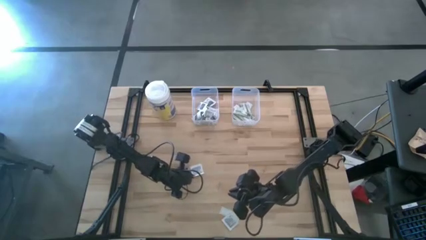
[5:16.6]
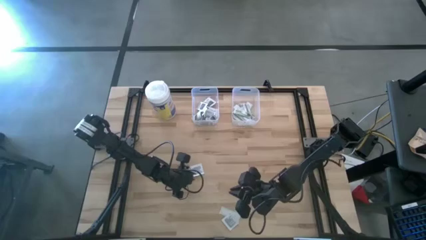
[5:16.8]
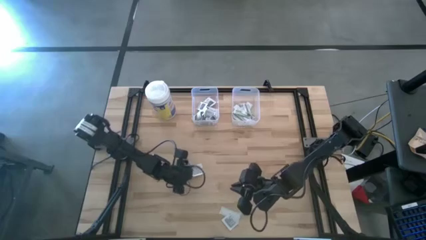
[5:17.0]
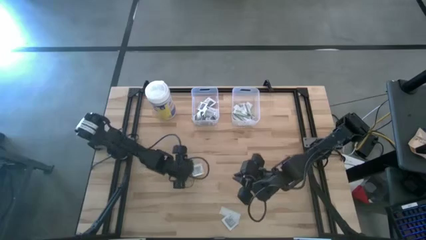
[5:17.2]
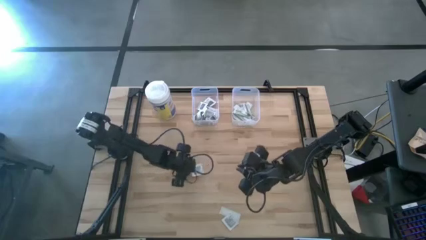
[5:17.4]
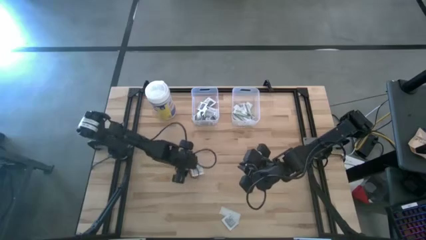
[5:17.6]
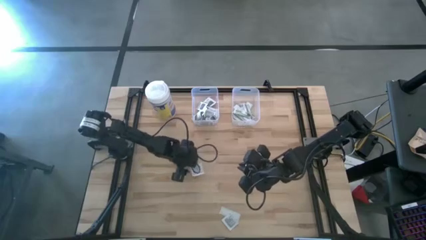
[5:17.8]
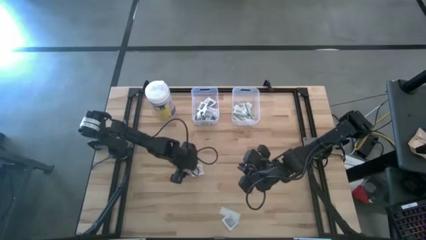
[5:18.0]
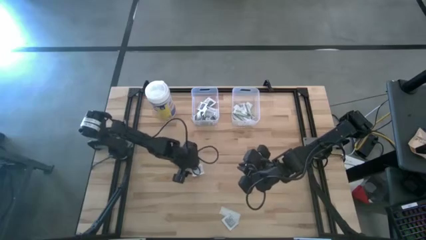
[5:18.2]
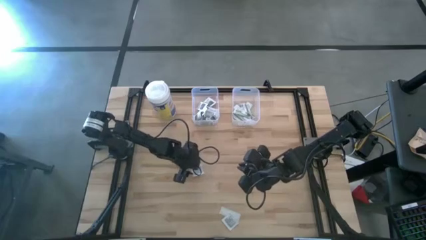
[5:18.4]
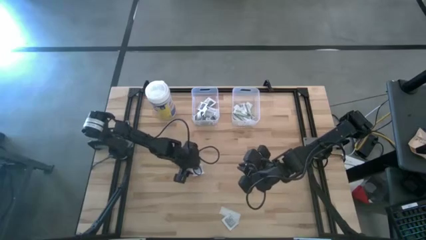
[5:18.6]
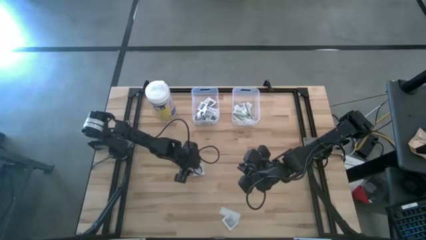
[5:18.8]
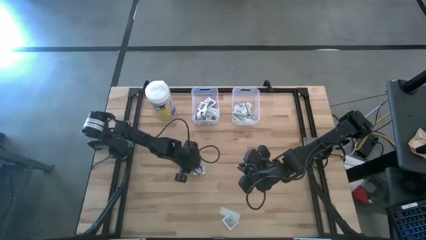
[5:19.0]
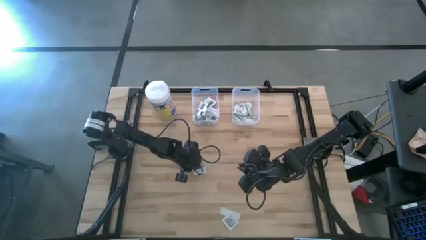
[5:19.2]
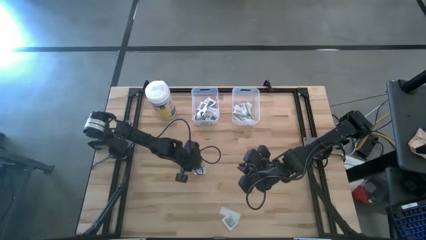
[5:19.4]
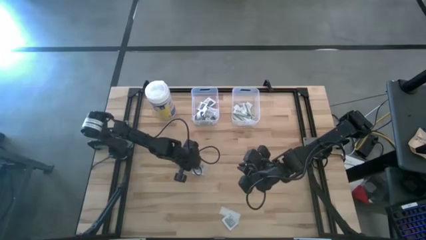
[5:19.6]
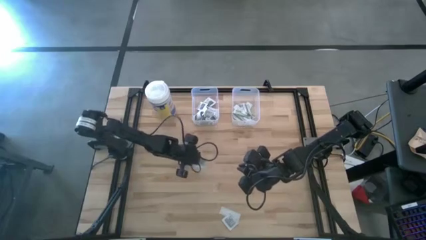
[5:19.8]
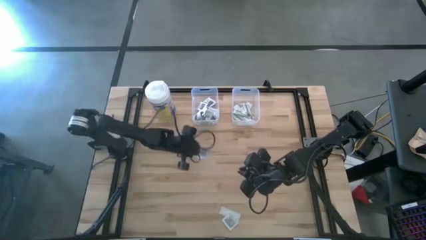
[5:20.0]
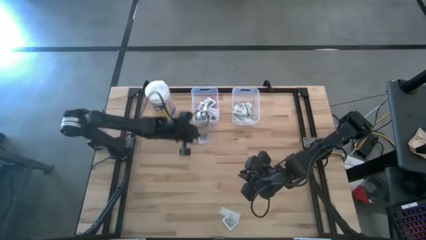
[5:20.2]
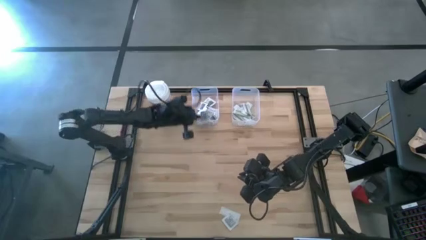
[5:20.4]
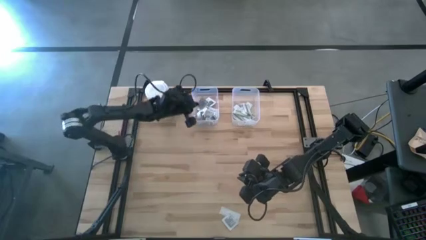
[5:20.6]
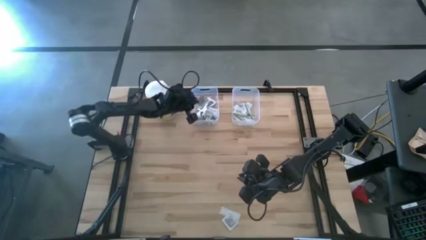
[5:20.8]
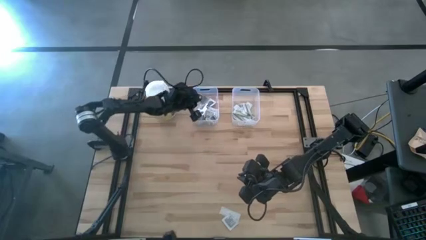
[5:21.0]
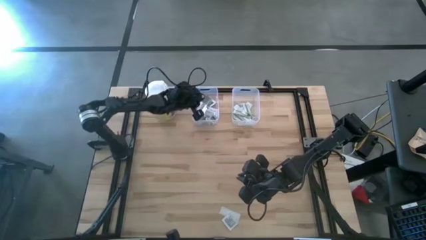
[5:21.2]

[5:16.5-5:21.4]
Task: Pick & Place First Aid Supplies
Put the towelette pack into the left transparent bin

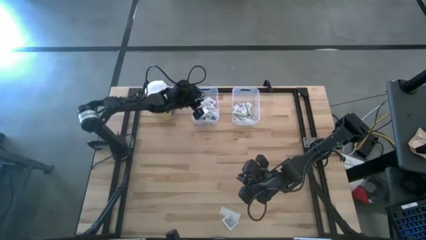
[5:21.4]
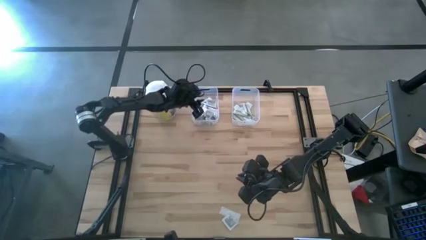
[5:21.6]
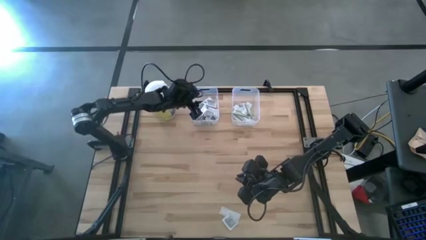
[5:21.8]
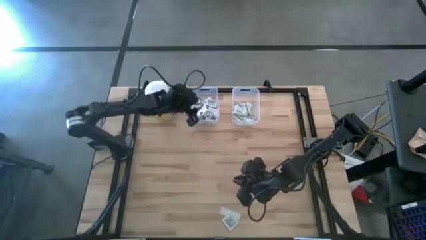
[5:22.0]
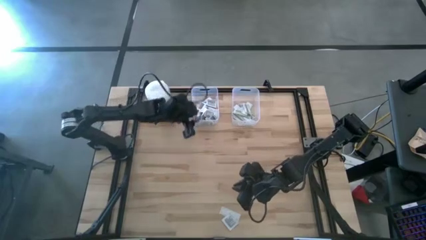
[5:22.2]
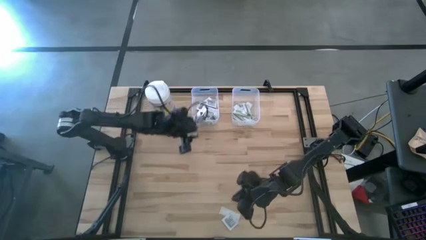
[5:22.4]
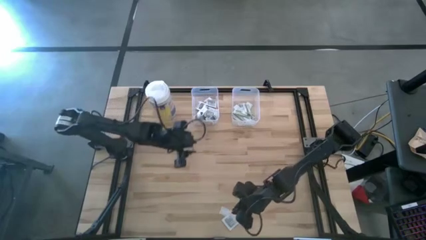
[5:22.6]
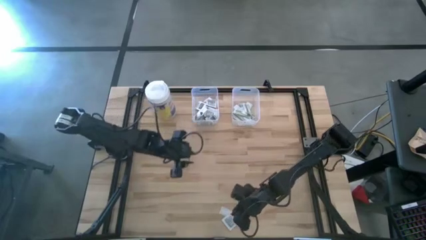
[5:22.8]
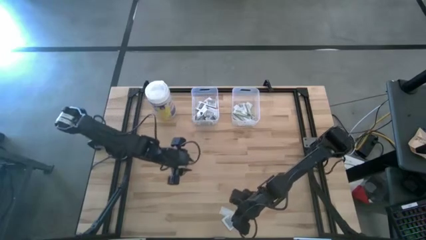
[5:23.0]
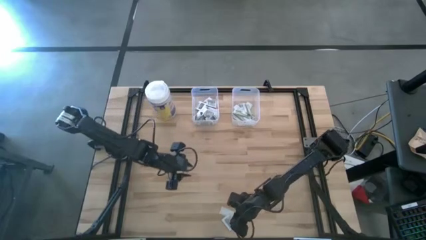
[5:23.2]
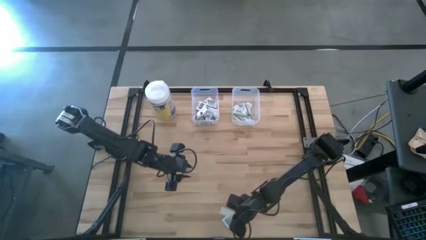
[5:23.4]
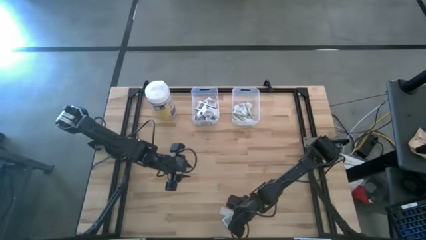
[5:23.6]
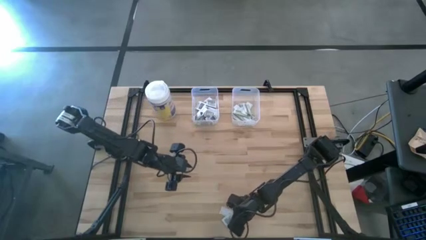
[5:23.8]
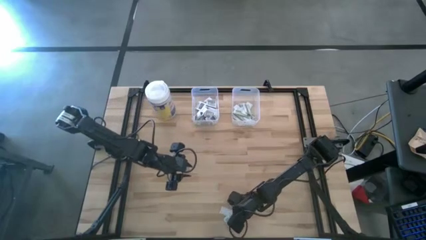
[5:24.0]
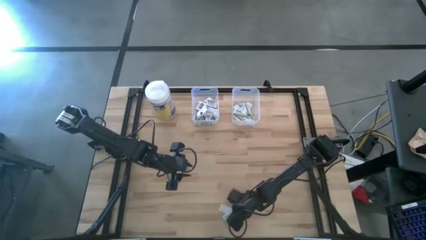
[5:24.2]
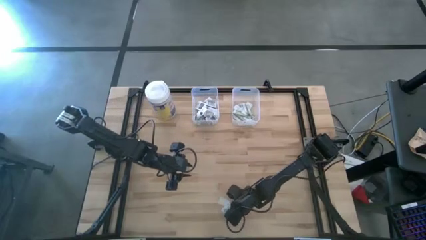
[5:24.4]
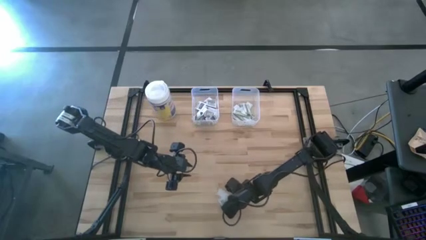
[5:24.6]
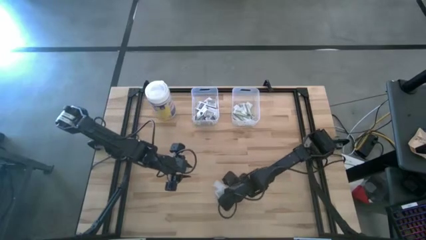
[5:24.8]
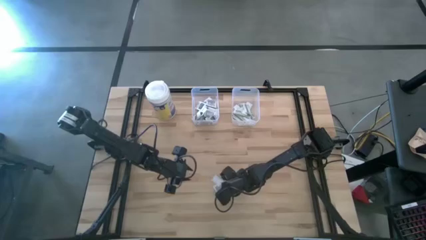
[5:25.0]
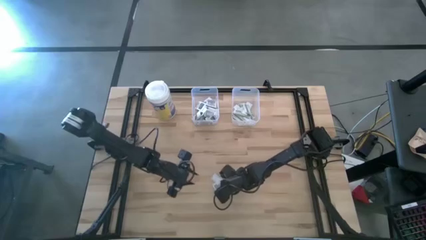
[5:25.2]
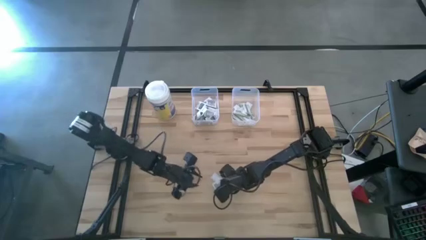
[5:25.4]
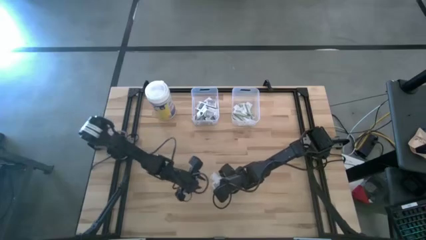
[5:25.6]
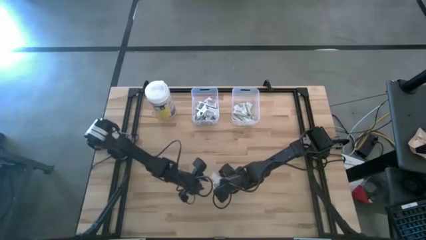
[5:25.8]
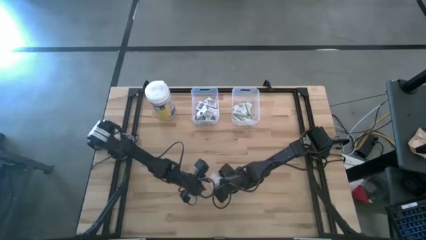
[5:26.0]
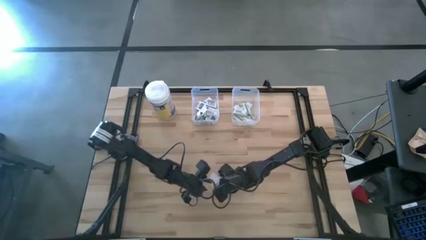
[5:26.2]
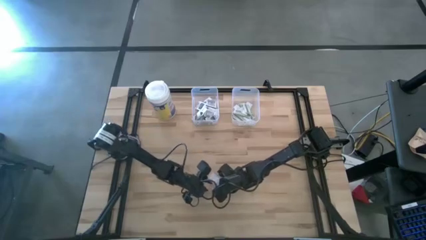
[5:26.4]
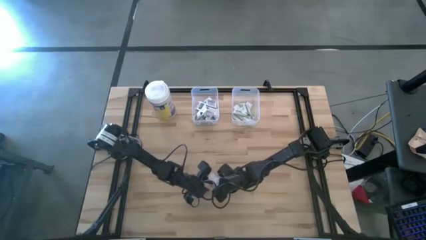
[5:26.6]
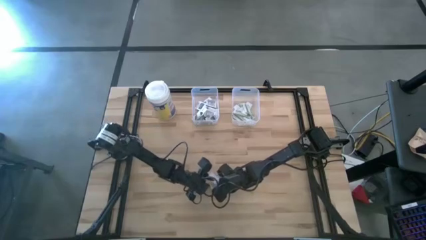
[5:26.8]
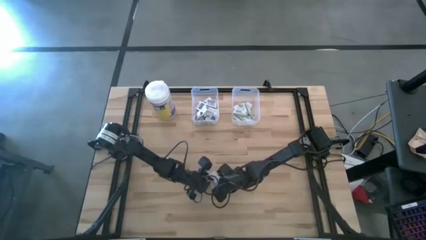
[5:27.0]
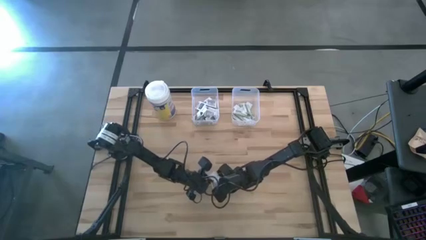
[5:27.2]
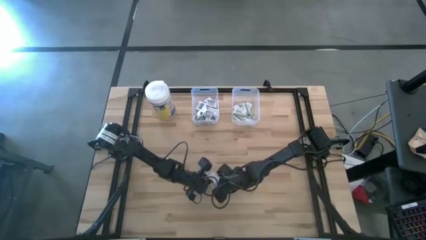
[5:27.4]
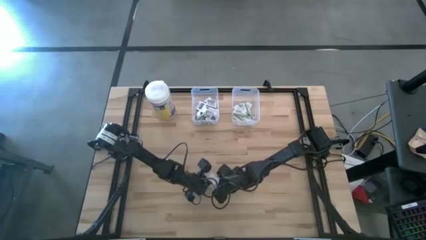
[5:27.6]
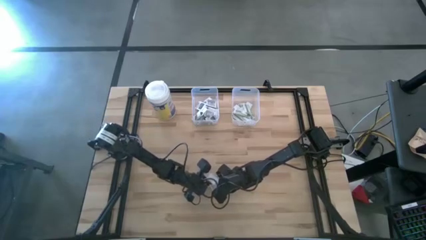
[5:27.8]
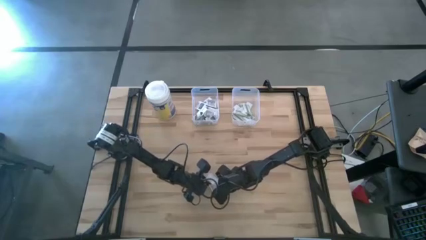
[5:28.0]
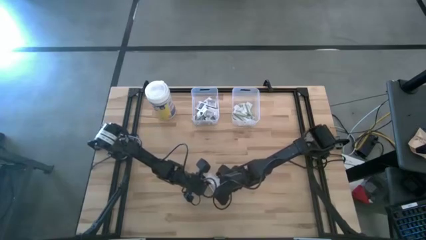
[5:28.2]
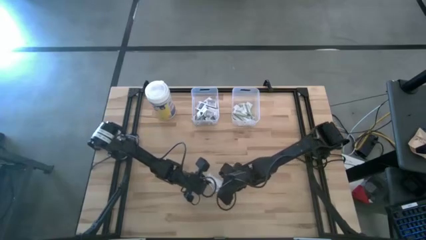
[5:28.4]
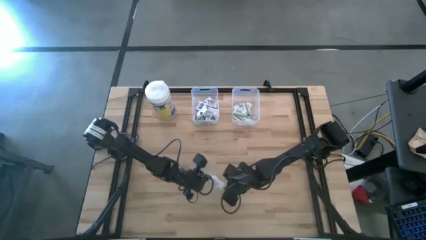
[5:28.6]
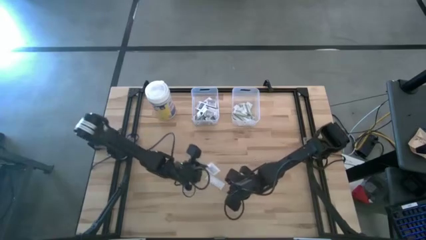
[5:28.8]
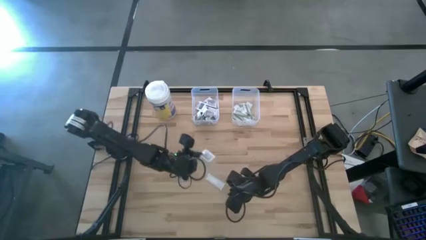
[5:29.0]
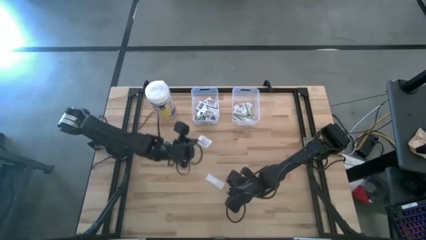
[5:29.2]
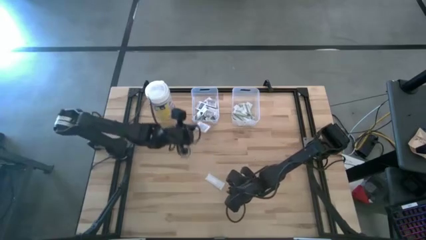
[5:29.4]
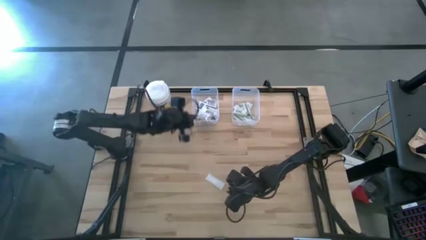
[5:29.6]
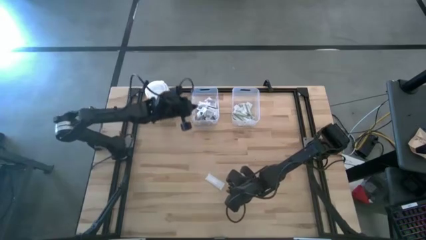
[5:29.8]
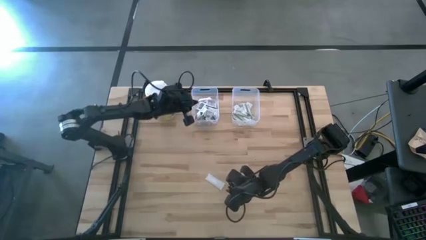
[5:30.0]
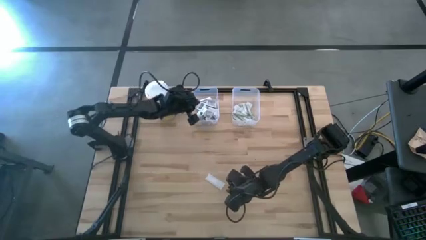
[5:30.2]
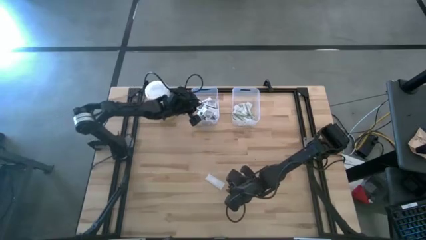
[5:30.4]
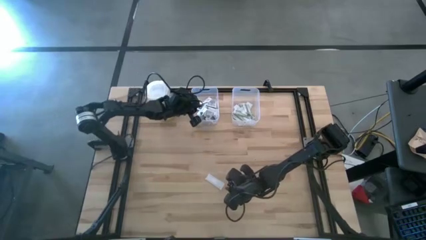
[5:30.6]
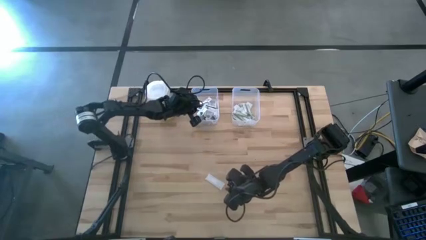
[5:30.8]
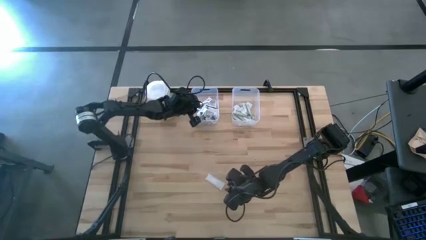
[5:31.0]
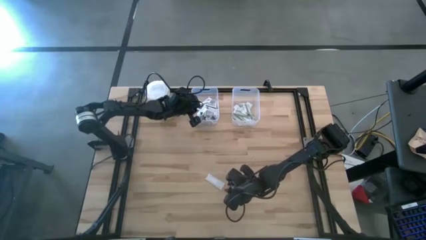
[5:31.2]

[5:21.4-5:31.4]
Put the towelette pack into the left transparent bin
